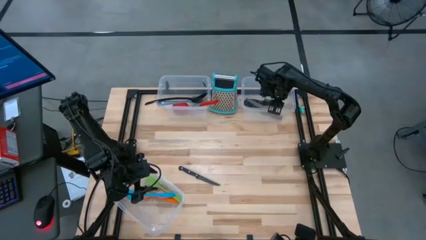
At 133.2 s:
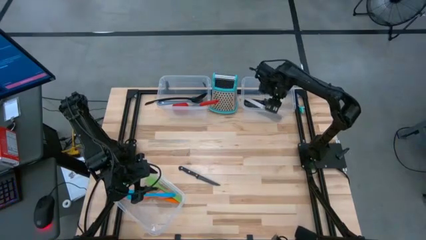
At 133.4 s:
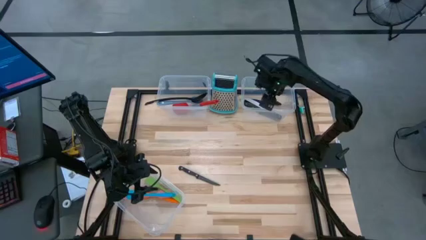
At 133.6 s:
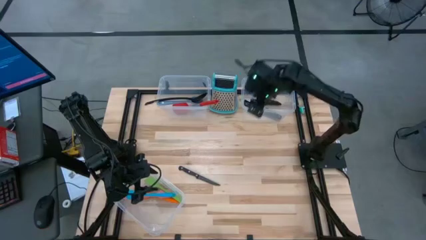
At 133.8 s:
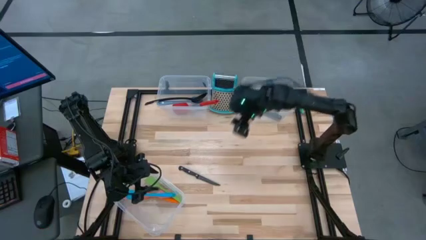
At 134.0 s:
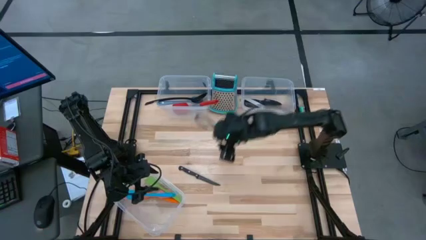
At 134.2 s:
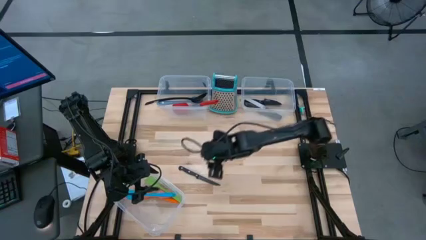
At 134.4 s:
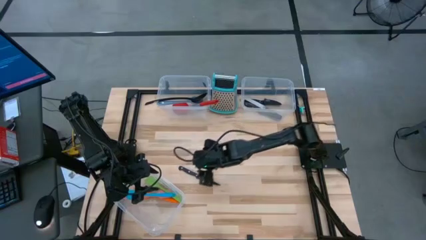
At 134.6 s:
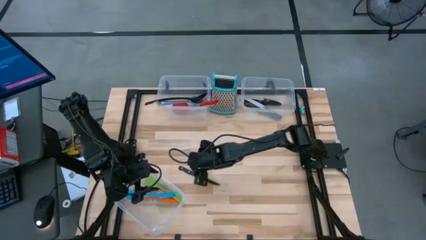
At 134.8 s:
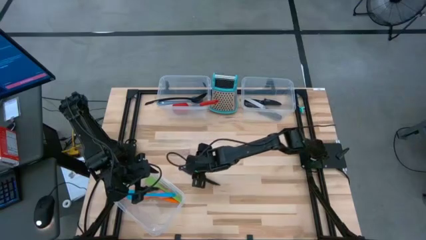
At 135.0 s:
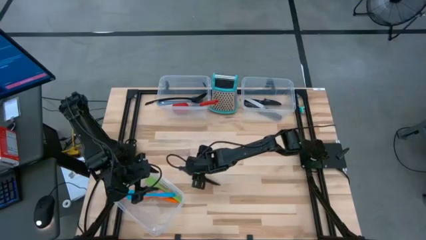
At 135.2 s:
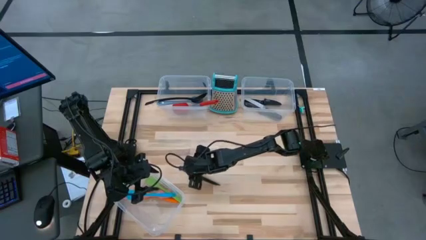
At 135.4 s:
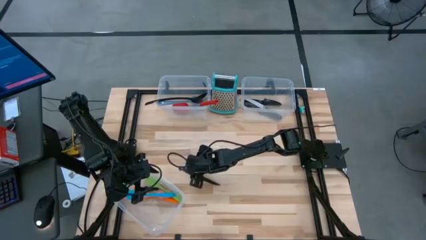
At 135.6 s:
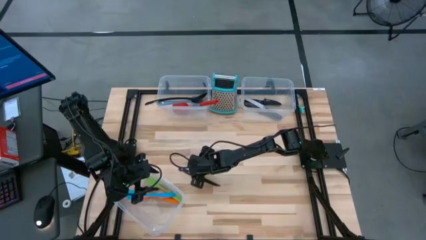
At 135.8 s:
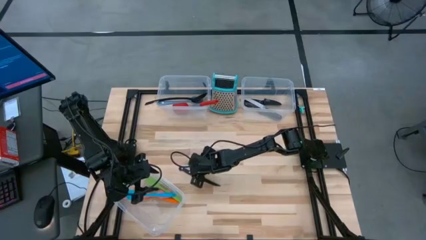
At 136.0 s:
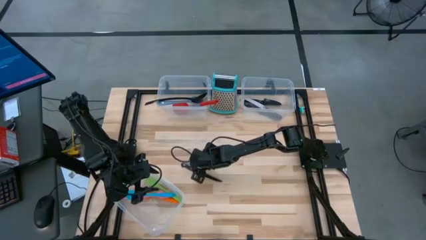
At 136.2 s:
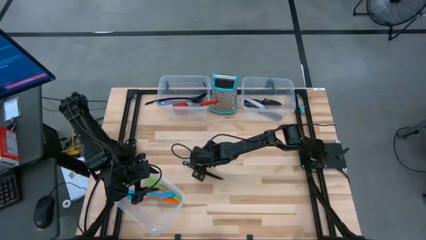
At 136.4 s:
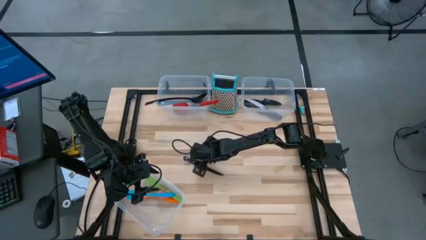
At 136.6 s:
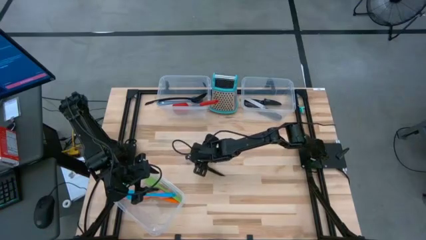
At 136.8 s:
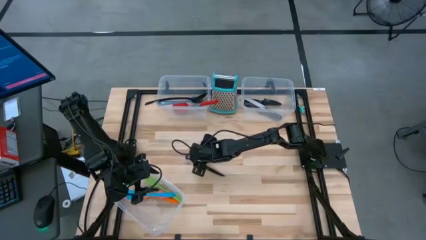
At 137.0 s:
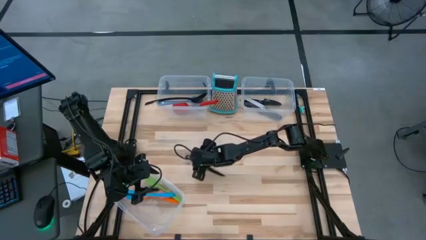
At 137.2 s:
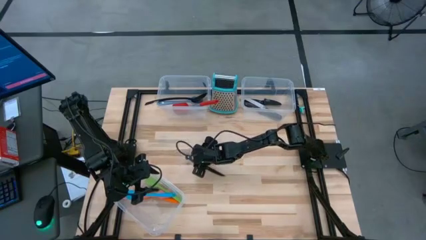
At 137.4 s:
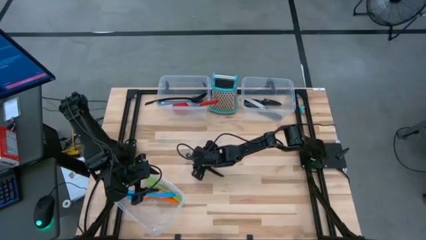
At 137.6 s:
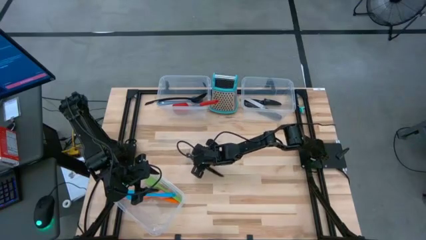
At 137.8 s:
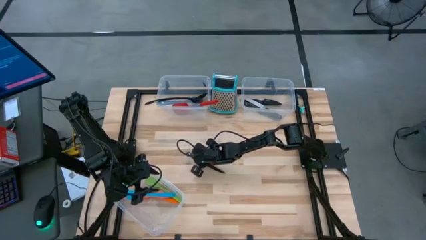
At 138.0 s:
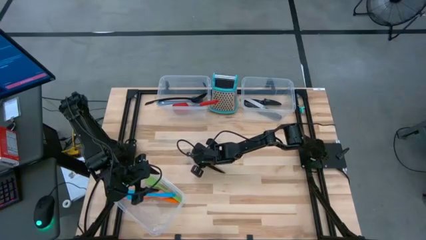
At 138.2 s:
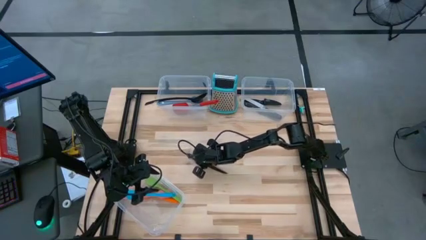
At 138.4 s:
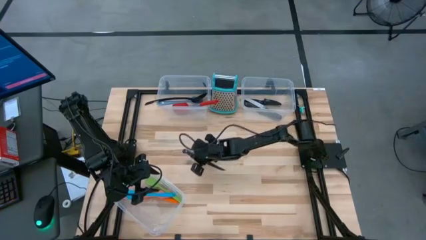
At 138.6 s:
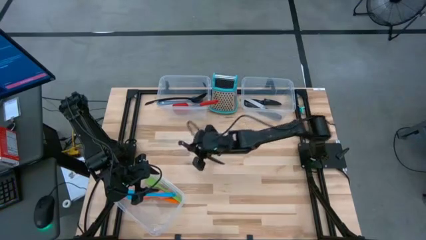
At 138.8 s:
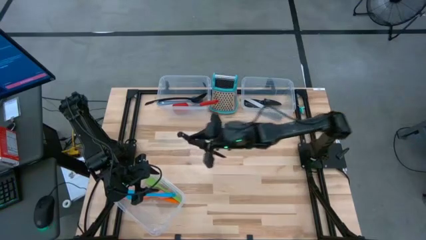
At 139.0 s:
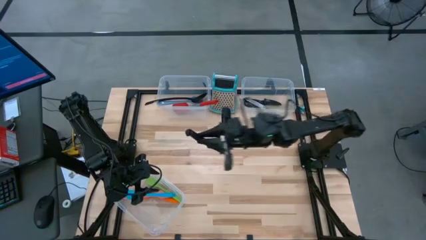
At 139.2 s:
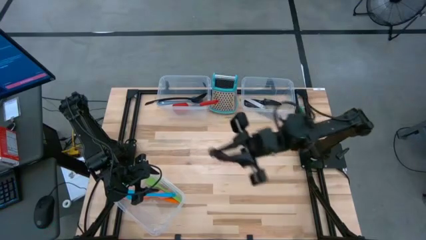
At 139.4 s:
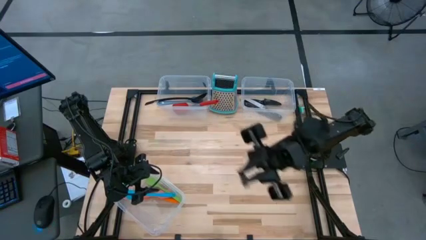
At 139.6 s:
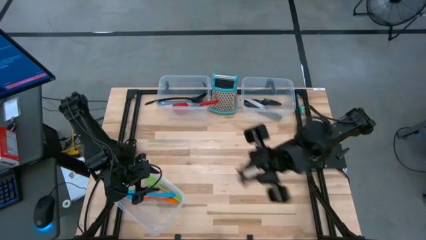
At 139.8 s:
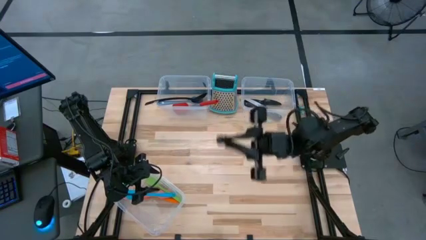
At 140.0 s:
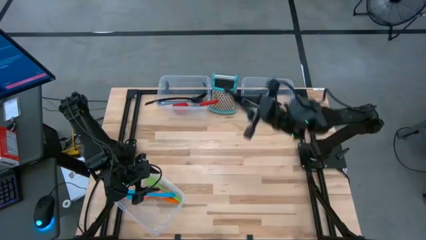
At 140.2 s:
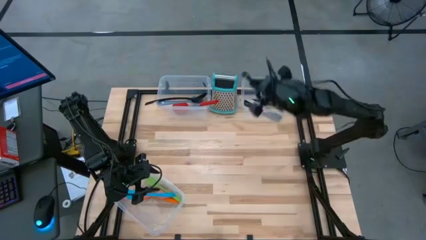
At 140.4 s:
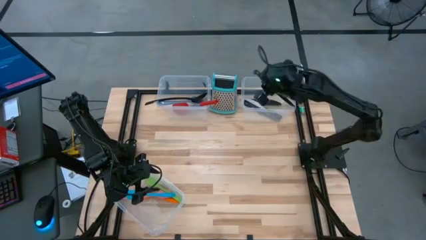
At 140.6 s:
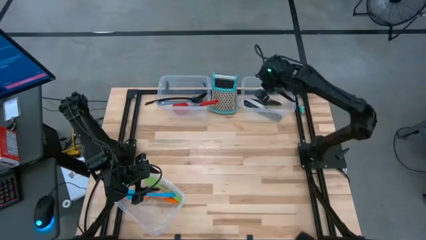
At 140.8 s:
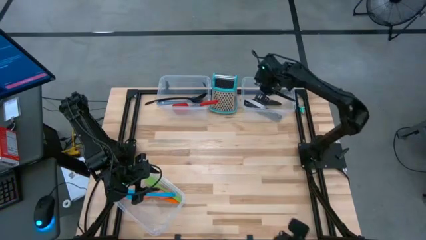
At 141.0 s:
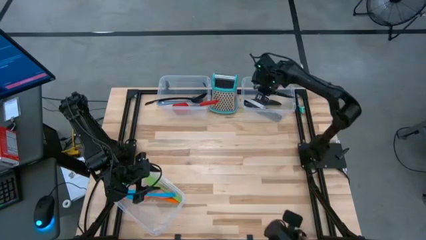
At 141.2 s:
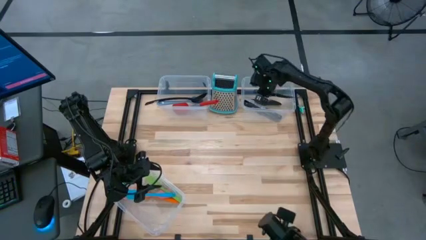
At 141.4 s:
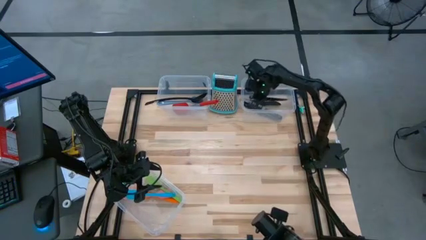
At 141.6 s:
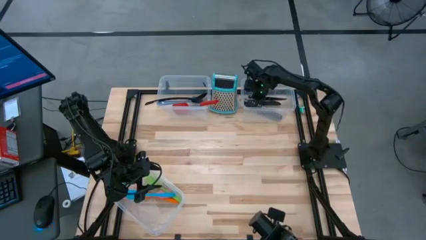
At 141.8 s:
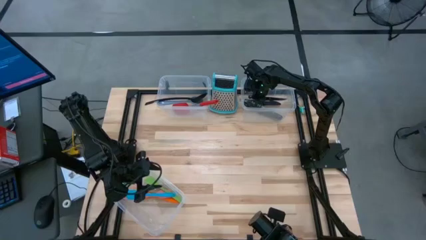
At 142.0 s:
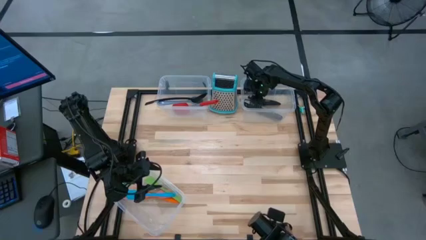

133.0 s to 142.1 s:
Task: Pick & Place Kitchen Items
Put the black table knife into the top right transparent bin

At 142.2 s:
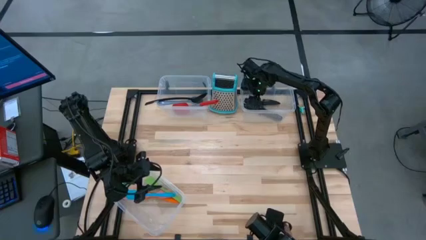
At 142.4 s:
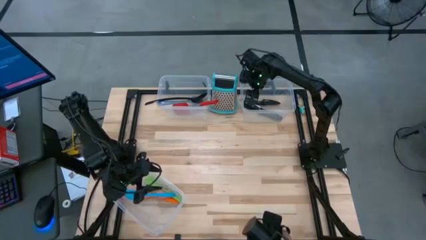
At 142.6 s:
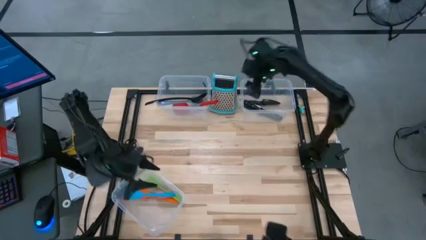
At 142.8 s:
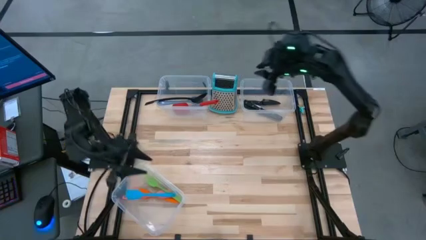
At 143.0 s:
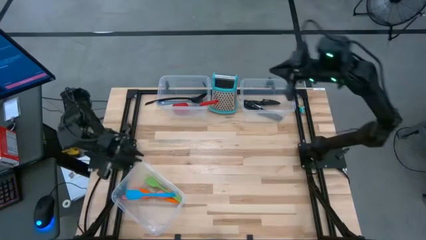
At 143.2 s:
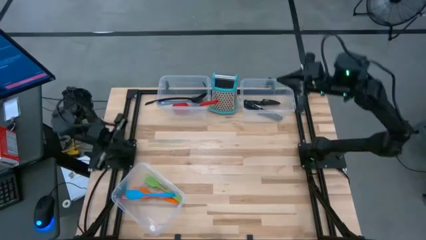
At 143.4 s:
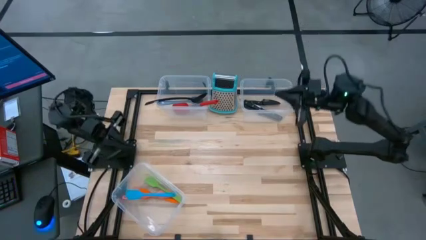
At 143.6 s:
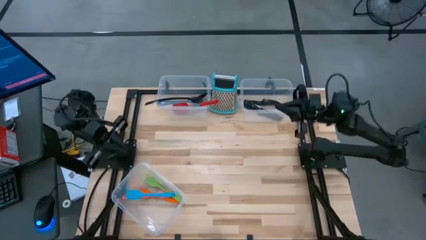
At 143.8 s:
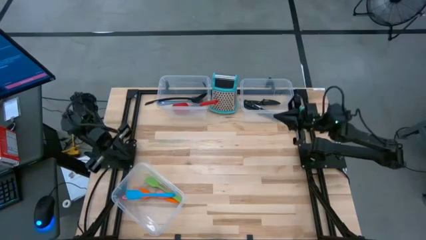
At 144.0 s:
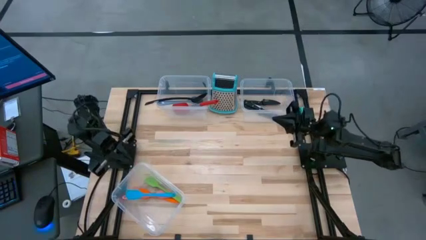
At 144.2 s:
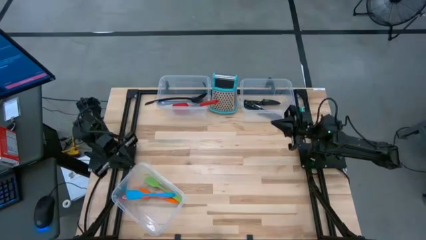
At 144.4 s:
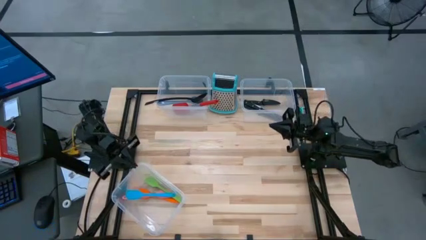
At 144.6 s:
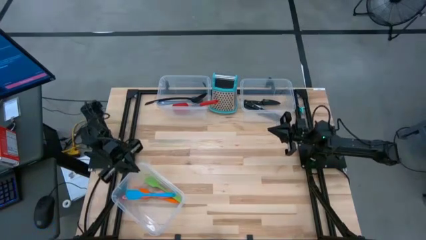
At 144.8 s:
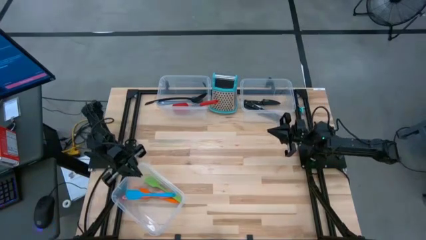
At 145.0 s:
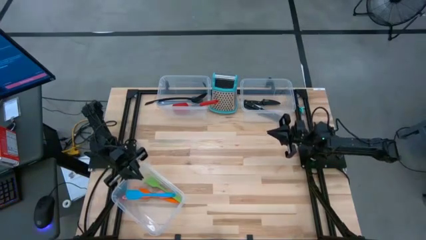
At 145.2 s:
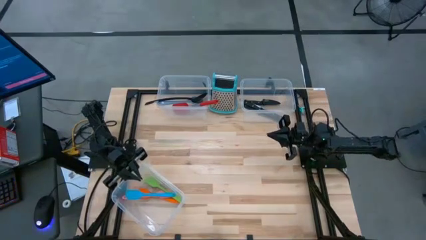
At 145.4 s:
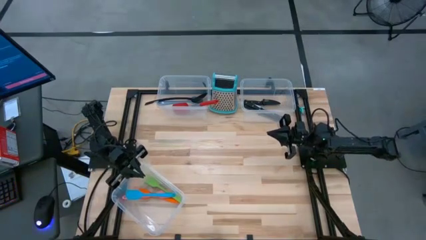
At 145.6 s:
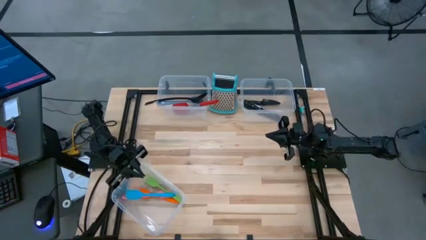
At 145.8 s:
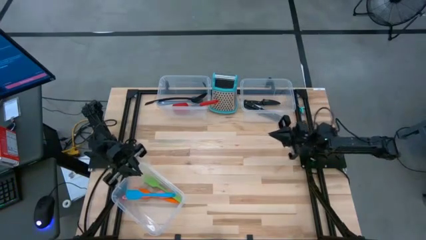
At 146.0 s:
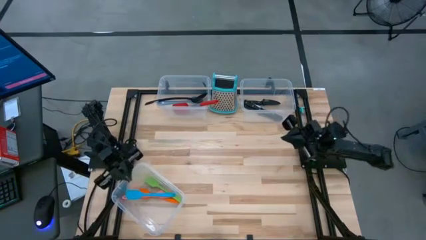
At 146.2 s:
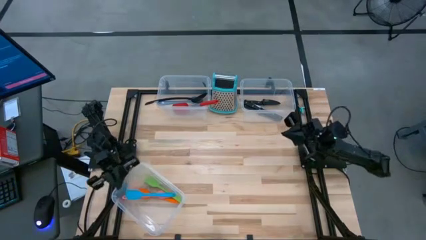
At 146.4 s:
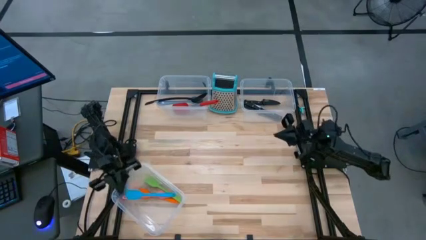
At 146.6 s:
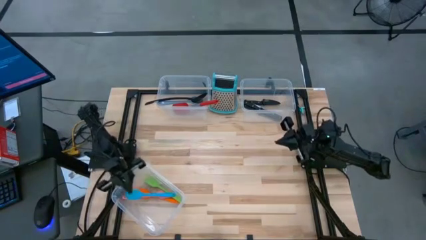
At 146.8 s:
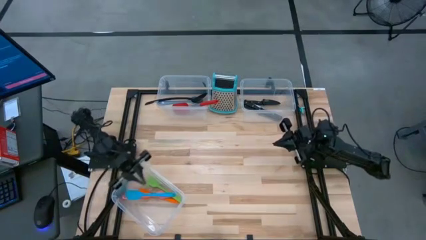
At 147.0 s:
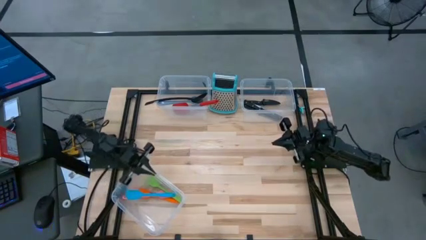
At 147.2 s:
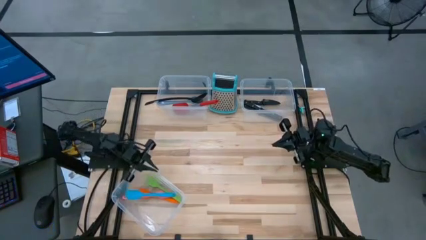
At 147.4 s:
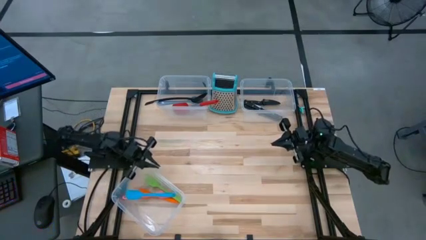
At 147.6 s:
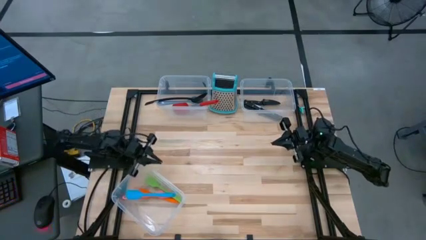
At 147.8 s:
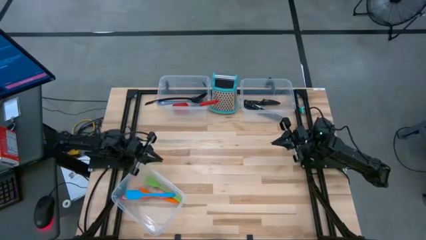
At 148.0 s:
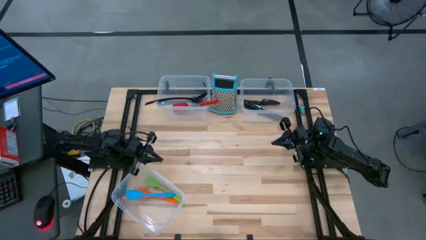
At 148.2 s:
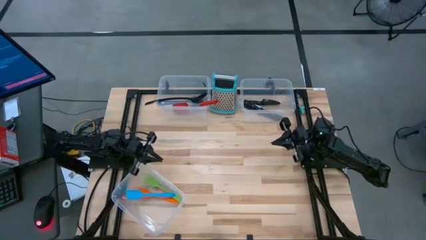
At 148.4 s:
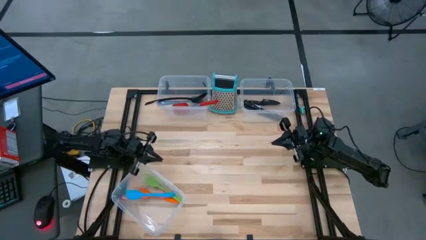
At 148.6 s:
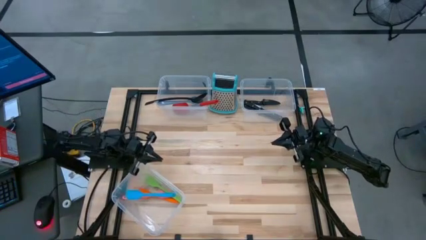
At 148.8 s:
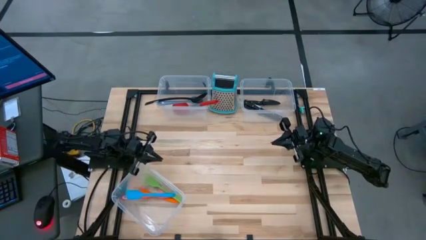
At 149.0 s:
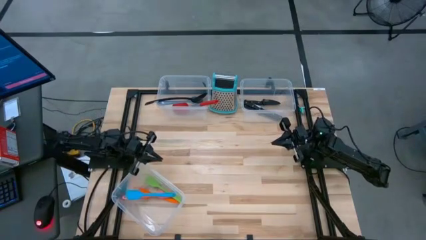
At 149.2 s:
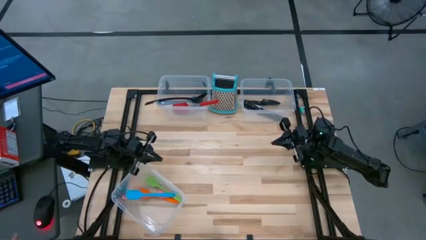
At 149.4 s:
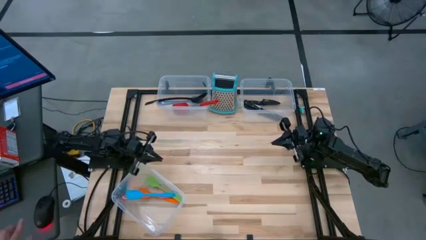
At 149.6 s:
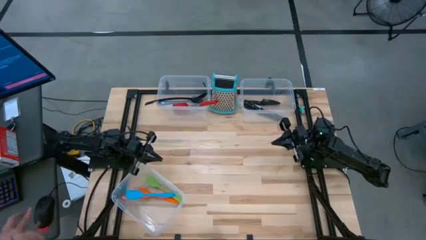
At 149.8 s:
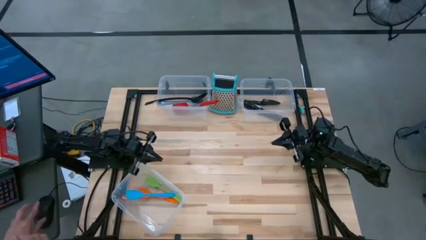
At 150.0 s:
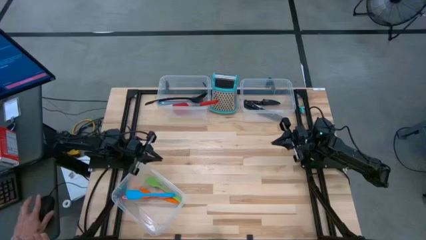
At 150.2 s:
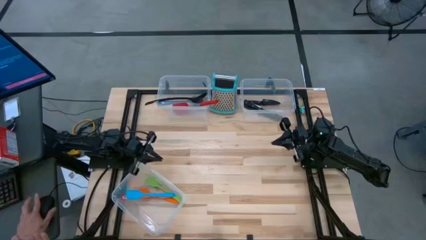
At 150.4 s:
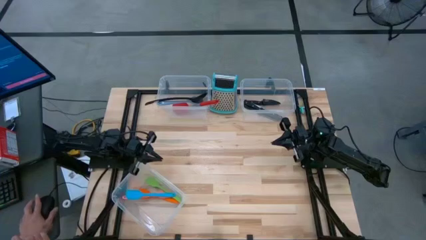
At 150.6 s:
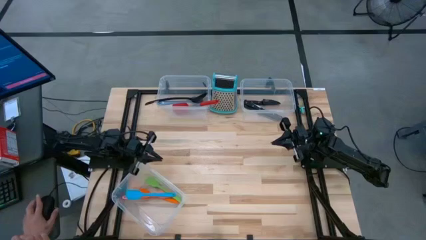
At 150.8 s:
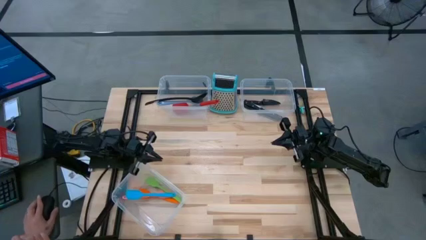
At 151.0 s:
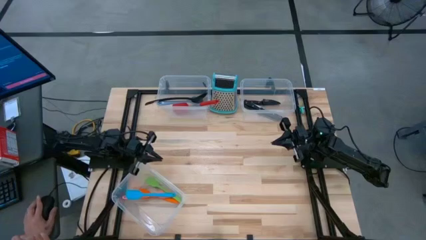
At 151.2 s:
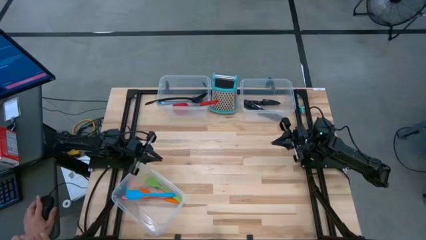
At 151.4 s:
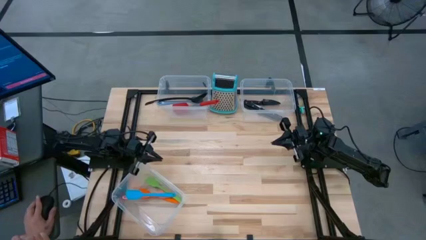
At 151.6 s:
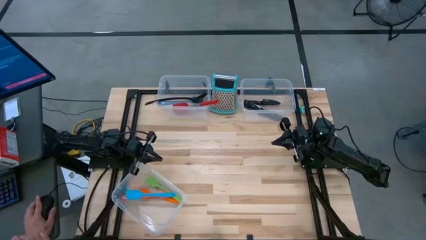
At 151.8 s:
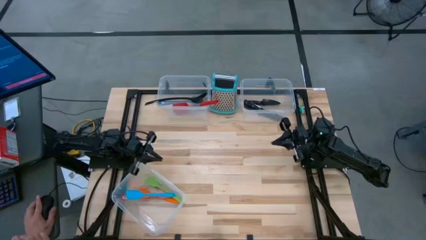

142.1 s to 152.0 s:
Return to Home Position
